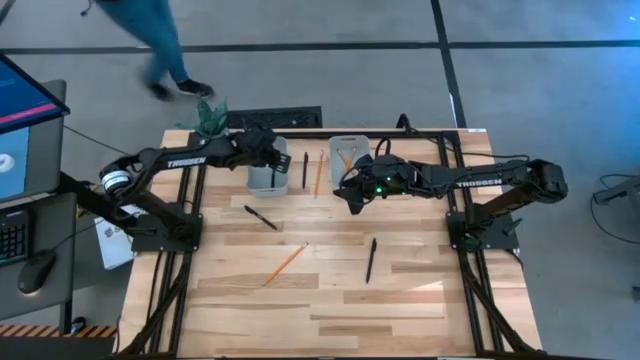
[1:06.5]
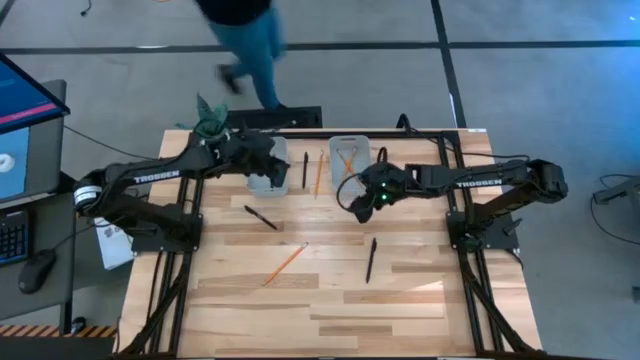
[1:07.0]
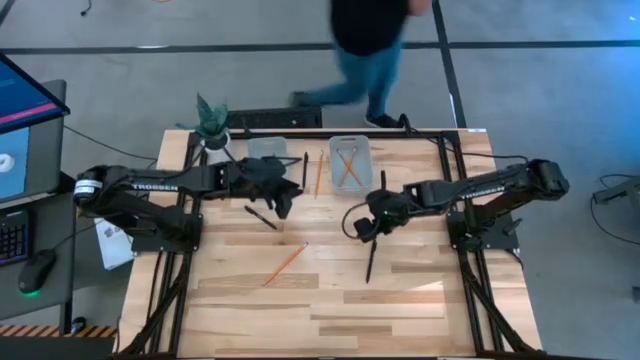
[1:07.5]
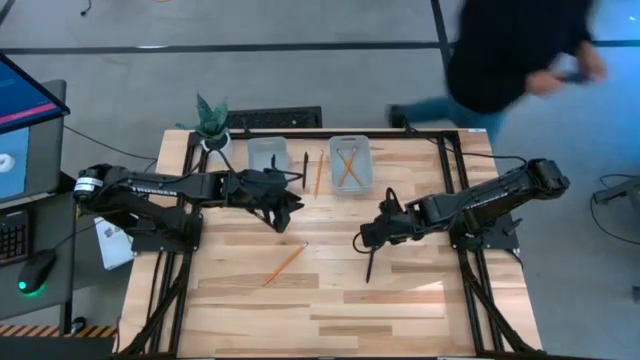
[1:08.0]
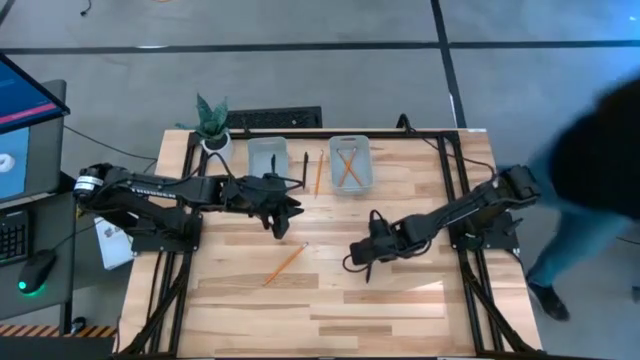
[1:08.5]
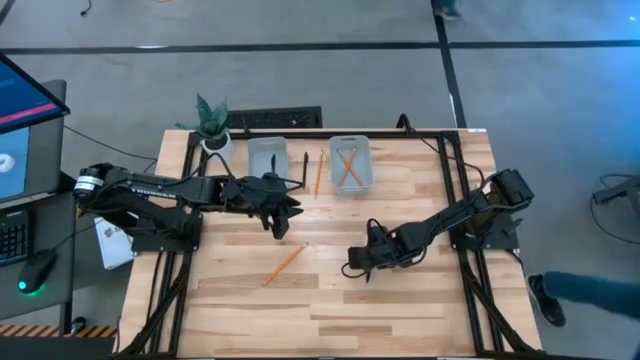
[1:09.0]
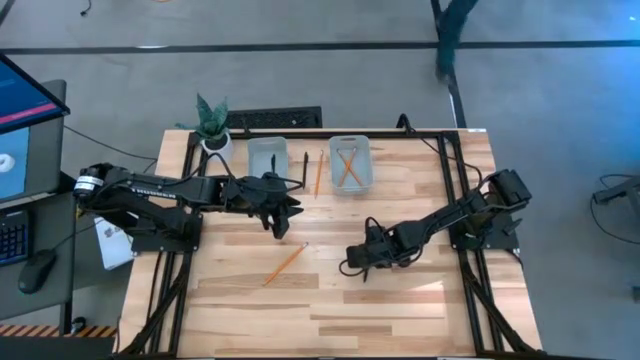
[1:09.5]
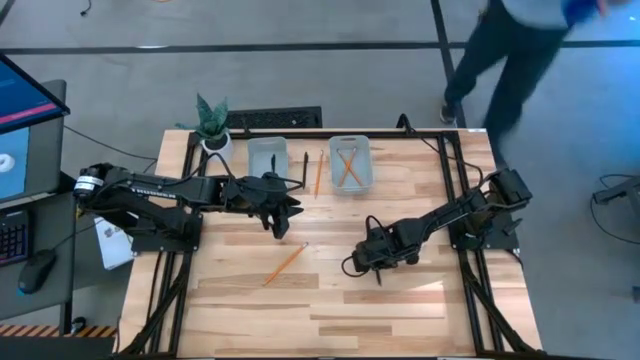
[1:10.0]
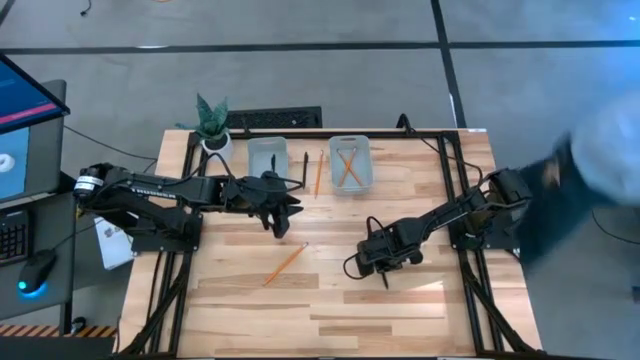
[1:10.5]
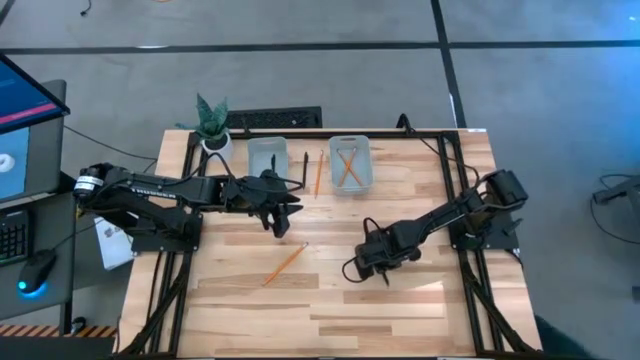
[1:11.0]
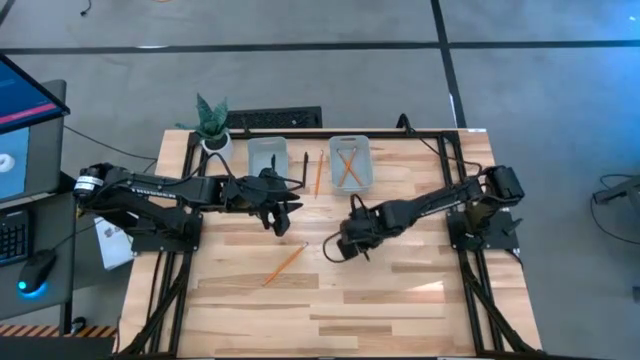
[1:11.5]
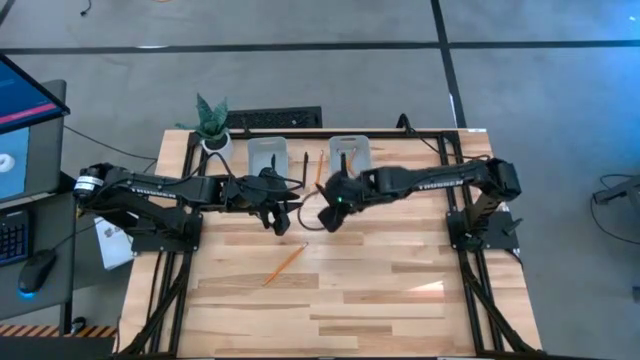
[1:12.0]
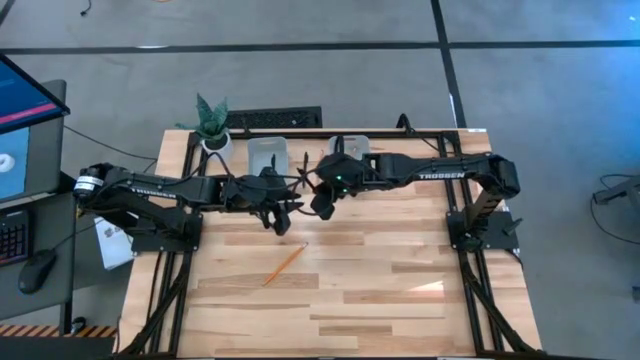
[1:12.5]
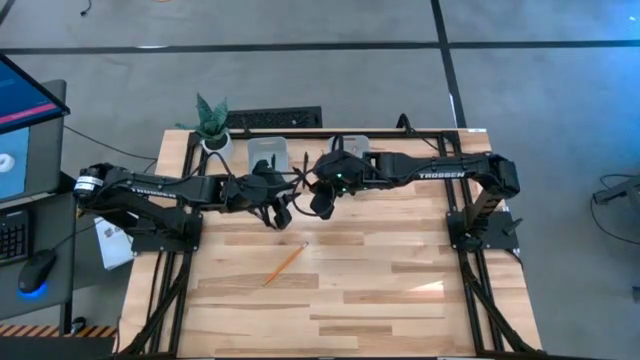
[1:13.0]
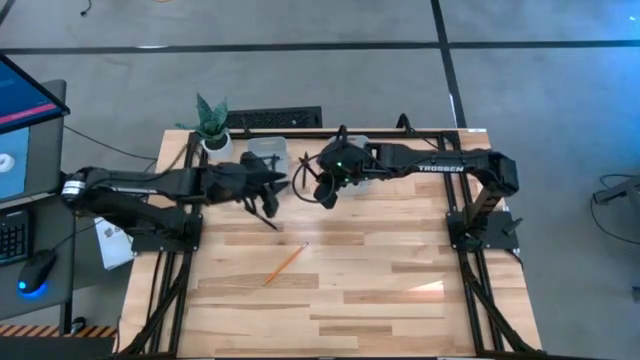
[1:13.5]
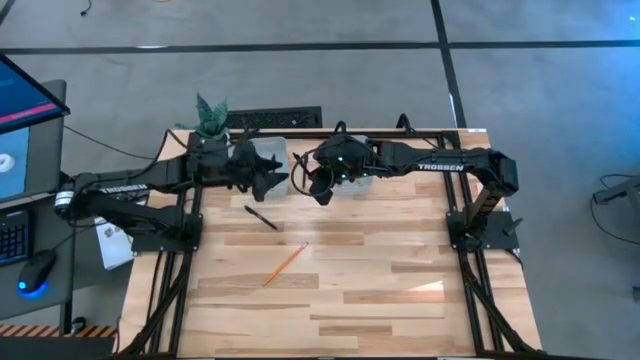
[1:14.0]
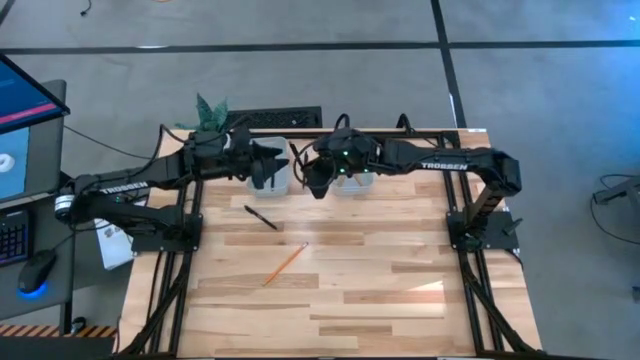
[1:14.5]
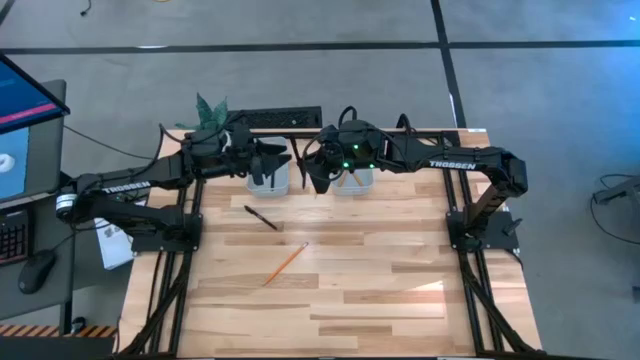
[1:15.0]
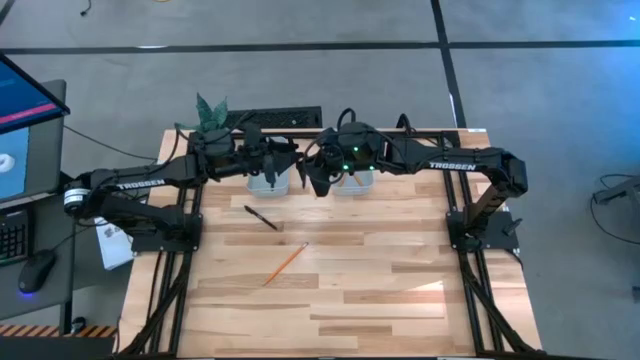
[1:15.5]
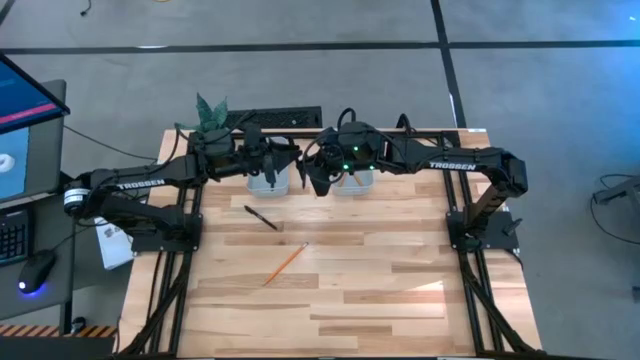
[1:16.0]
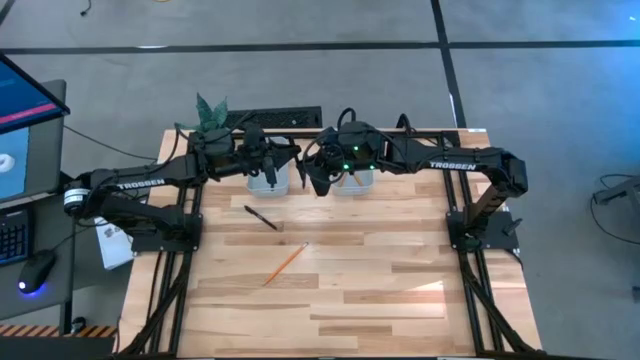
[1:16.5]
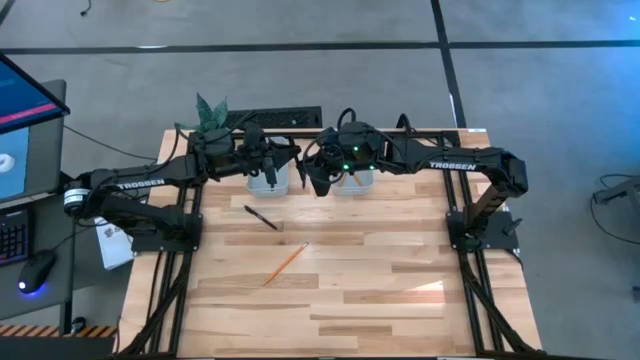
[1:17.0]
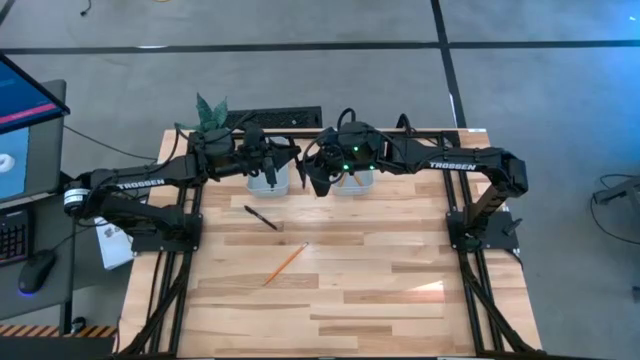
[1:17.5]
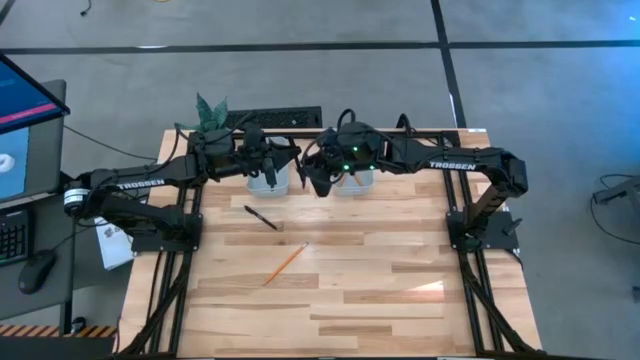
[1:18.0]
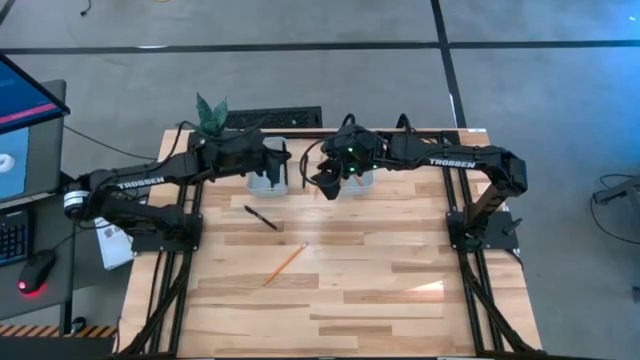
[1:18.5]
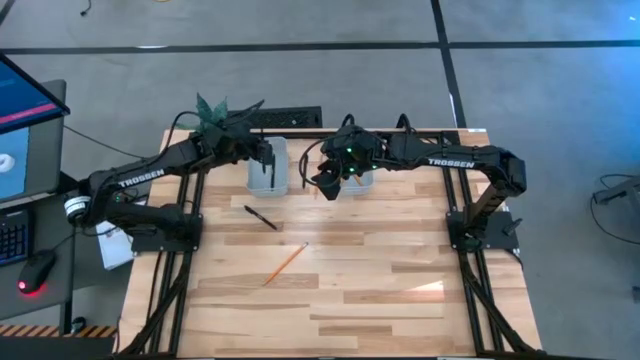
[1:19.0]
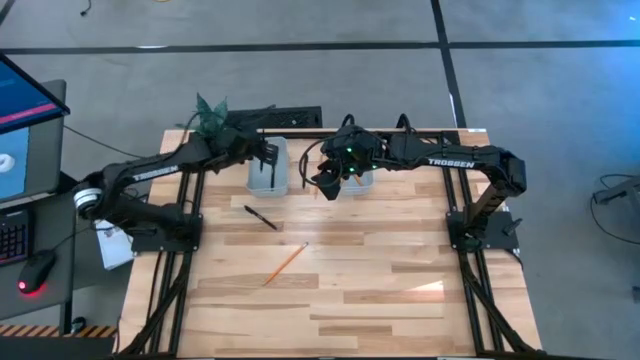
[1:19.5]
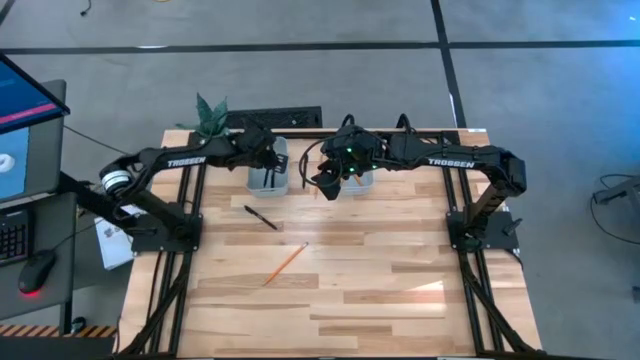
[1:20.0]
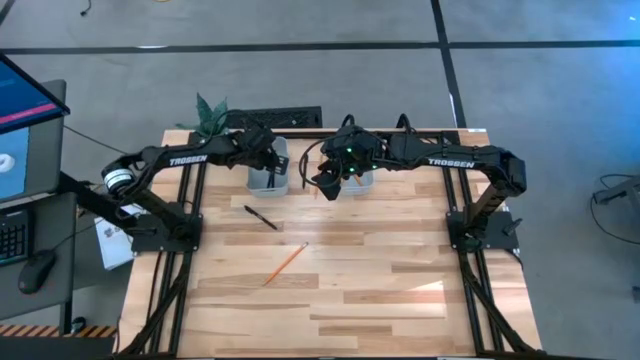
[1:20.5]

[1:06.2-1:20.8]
Task: Sort pens & pencils
Put the black pen into the left gray bin

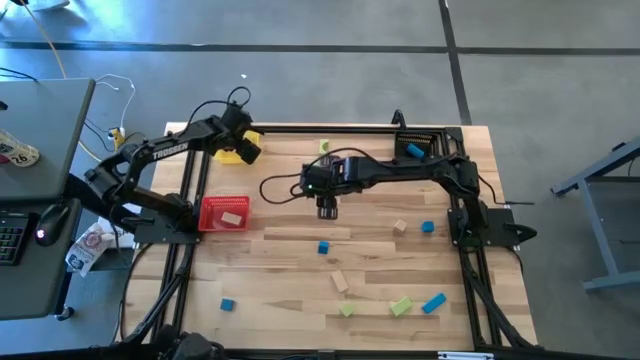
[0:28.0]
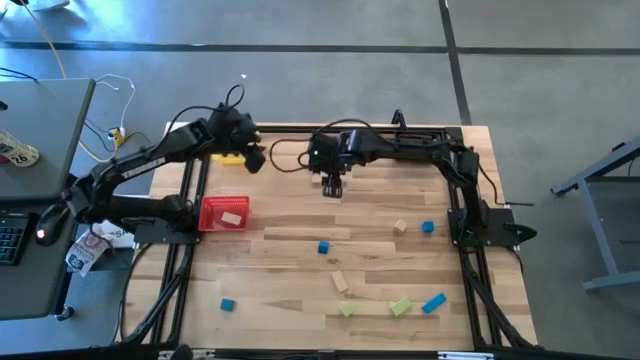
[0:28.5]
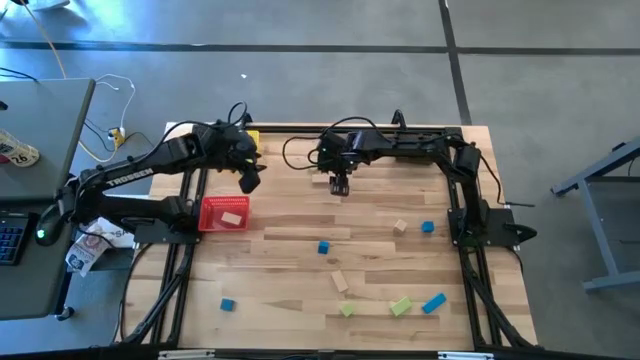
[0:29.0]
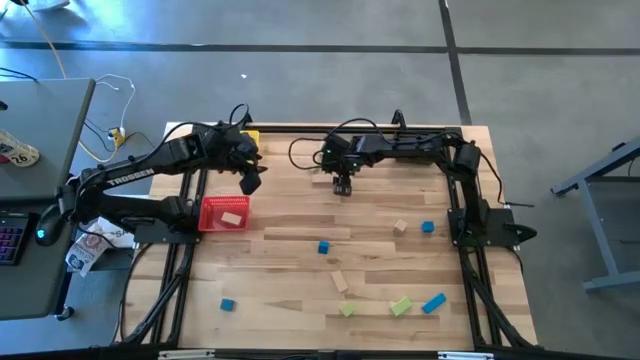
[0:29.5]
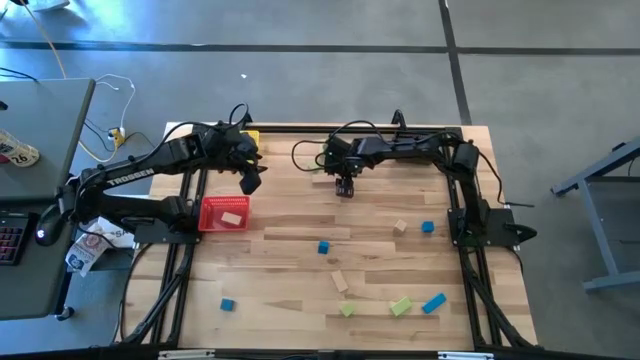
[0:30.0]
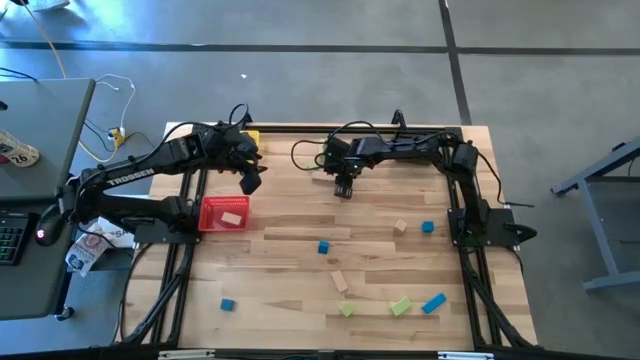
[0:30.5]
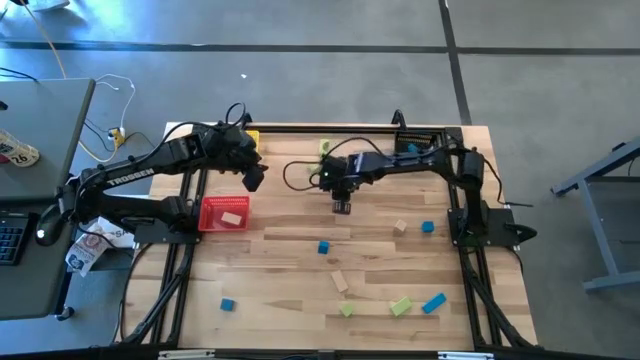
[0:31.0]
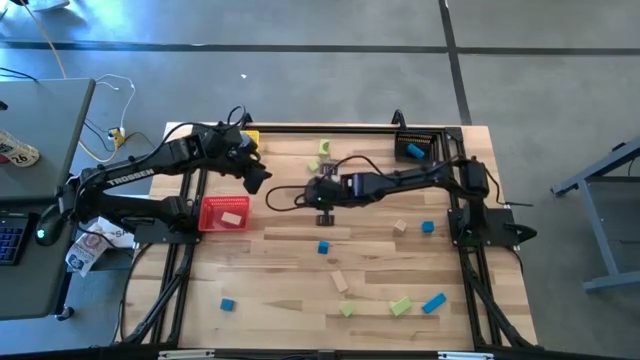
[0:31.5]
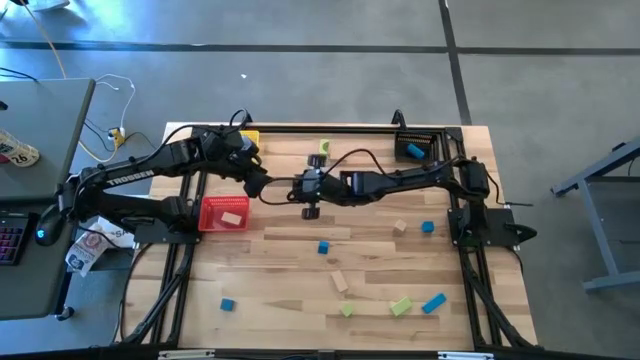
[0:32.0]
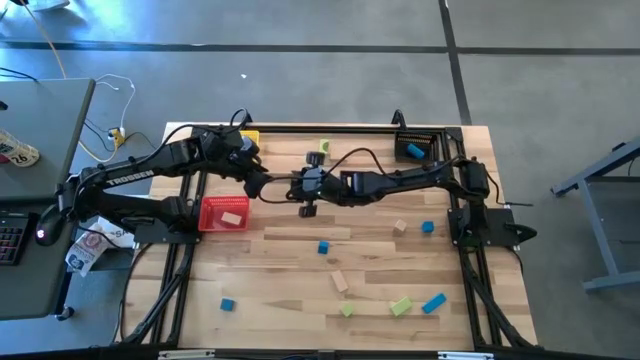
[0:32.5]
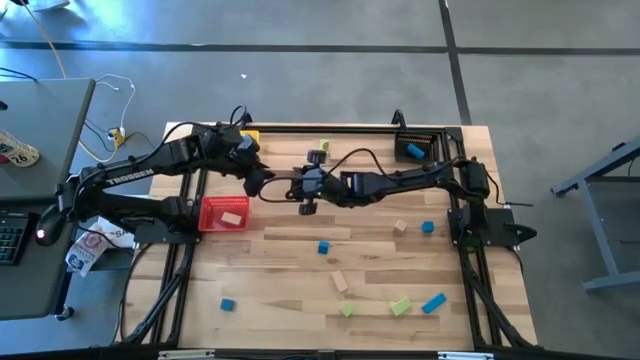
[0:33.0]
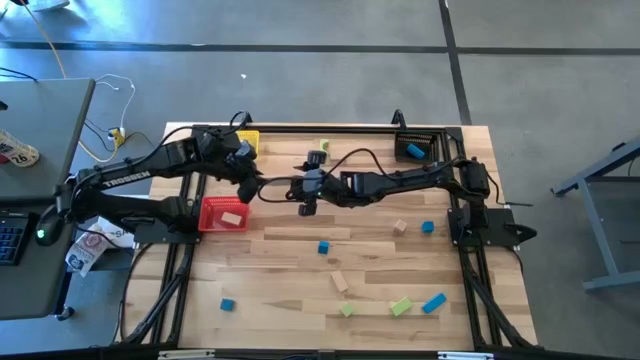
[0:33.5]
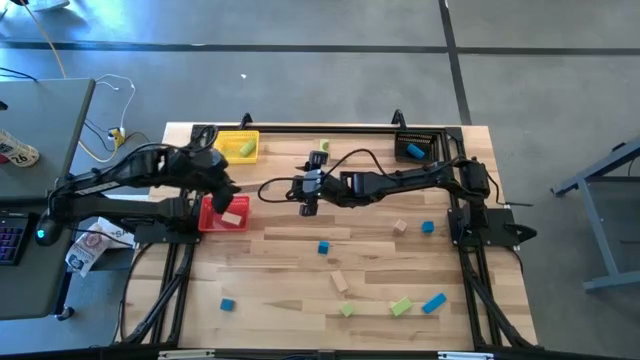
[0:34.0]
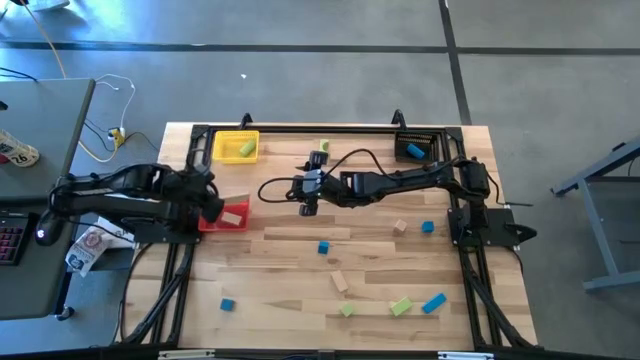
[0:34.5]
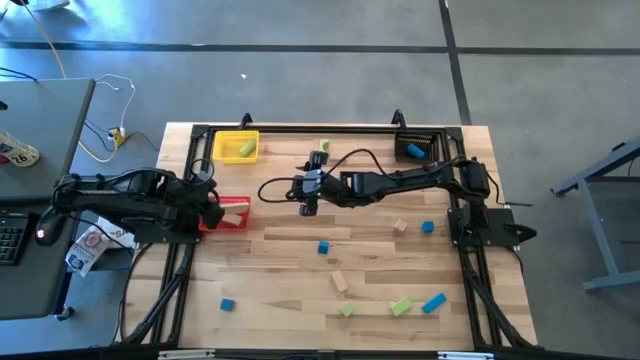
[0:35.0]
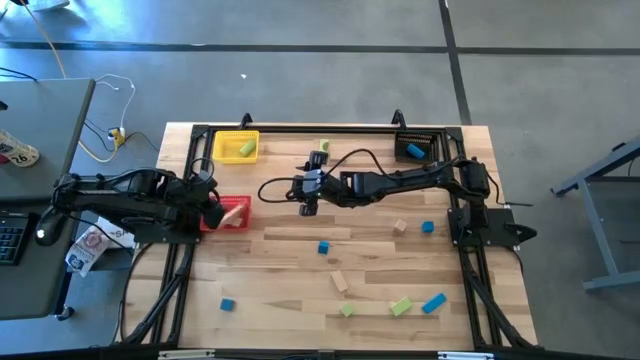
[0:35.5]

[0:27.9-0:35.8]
Task: Sort & place blocks by color
Put the brown block into the red bin
